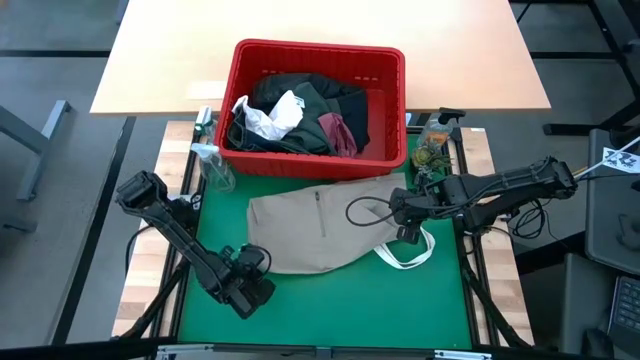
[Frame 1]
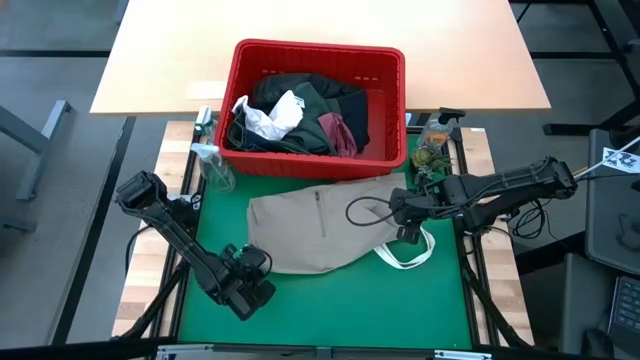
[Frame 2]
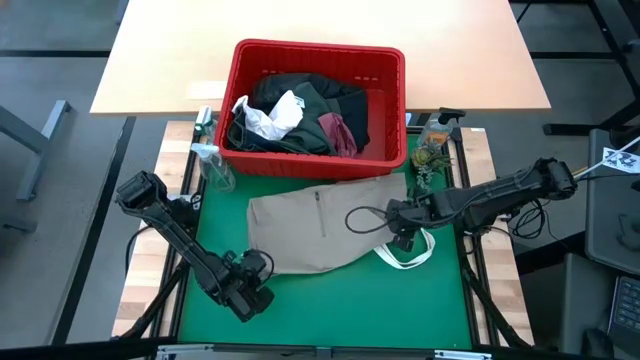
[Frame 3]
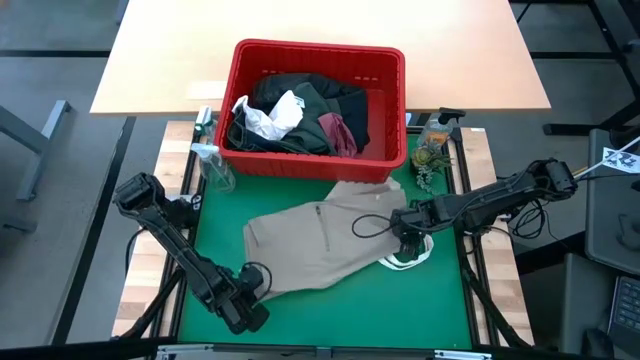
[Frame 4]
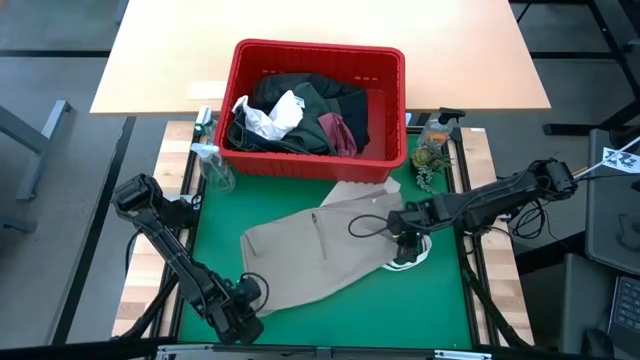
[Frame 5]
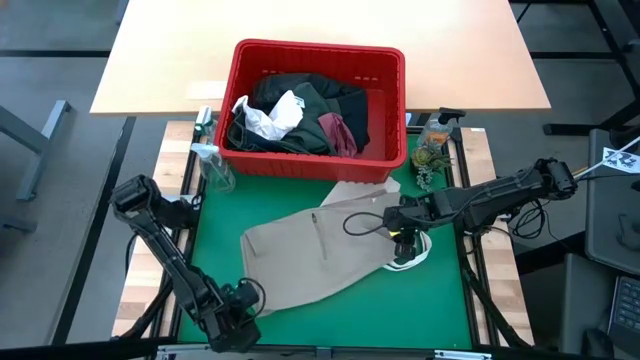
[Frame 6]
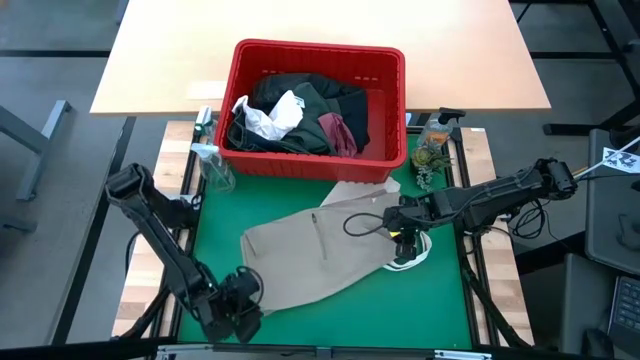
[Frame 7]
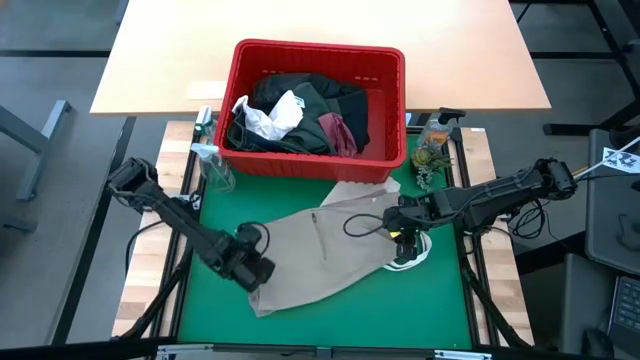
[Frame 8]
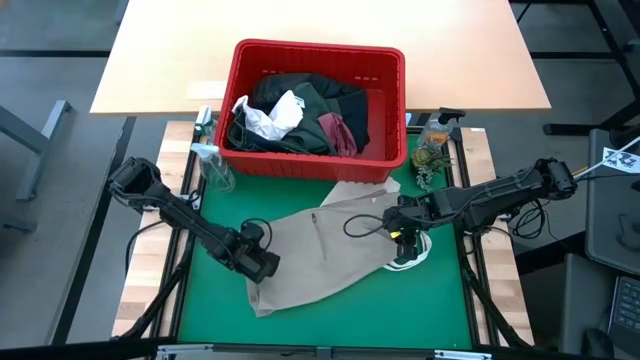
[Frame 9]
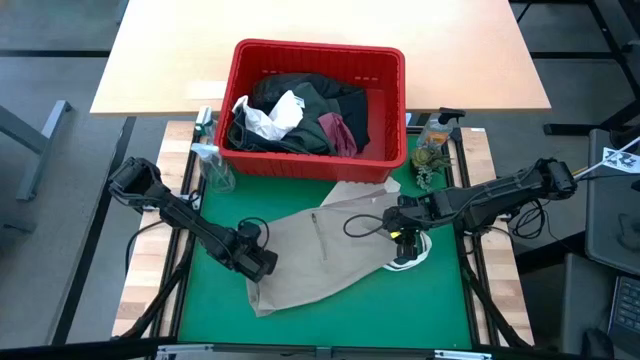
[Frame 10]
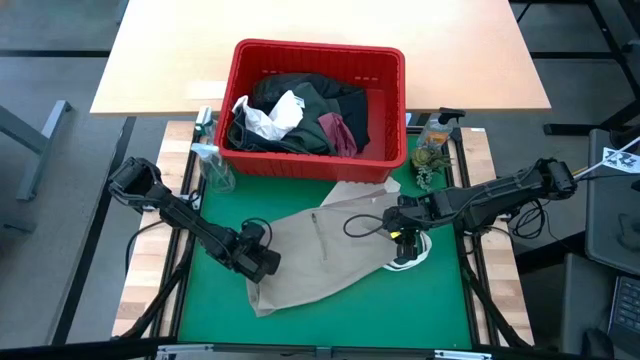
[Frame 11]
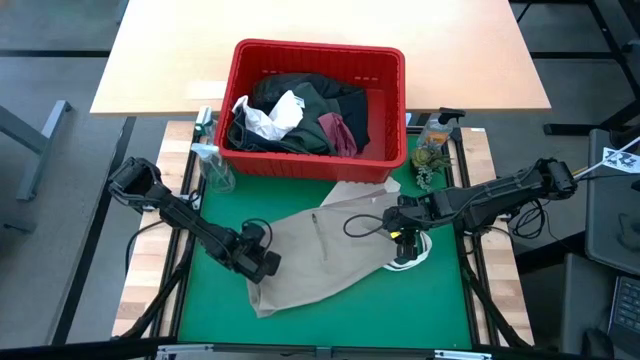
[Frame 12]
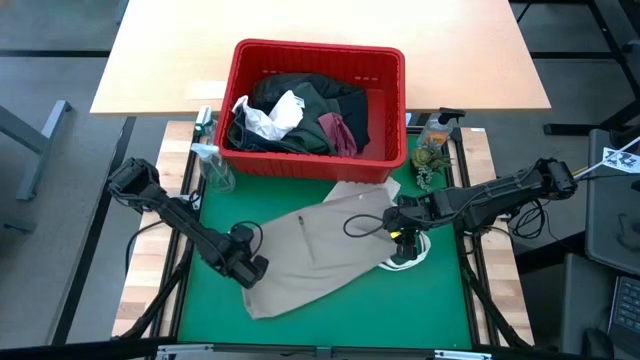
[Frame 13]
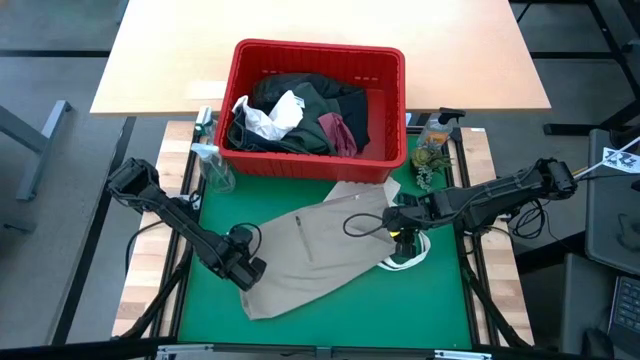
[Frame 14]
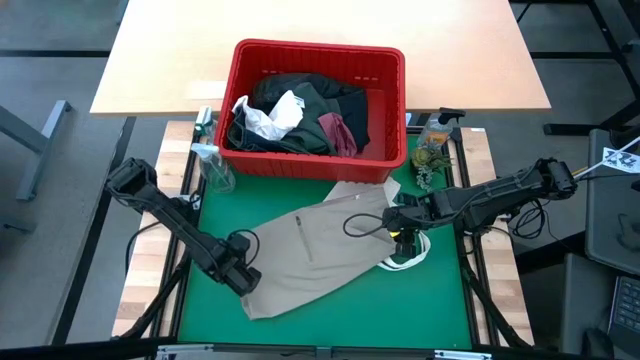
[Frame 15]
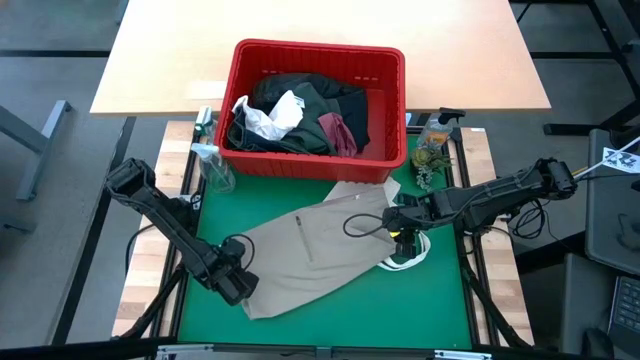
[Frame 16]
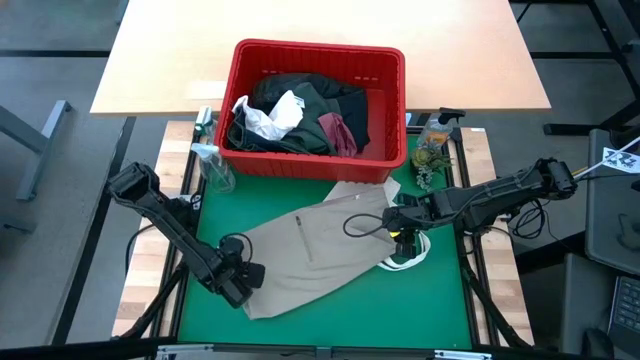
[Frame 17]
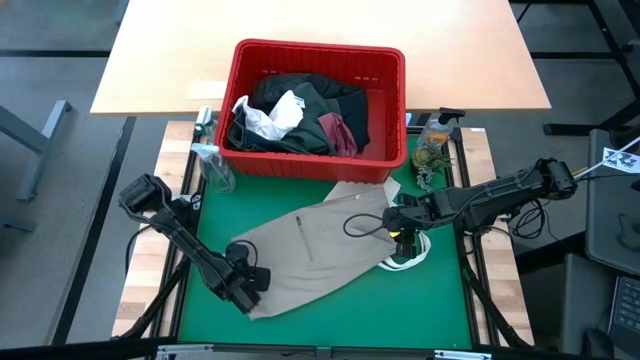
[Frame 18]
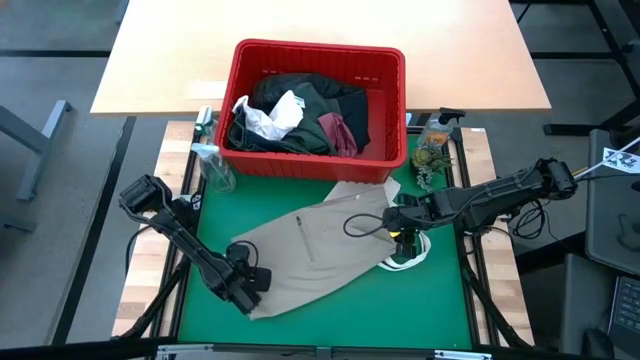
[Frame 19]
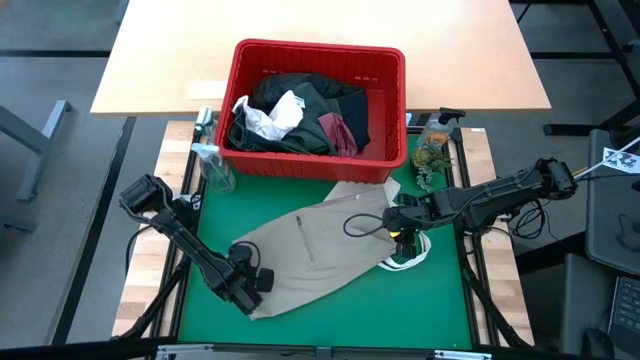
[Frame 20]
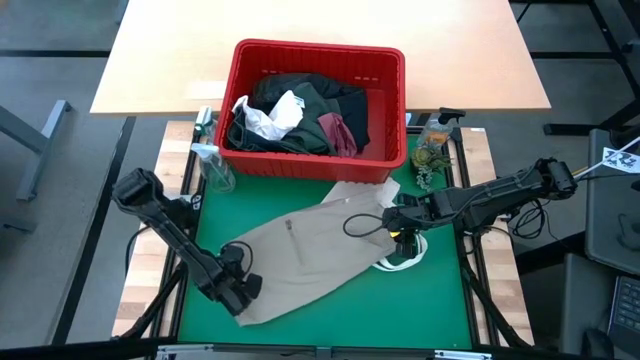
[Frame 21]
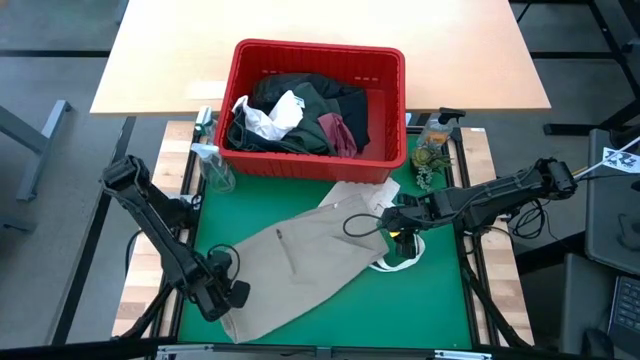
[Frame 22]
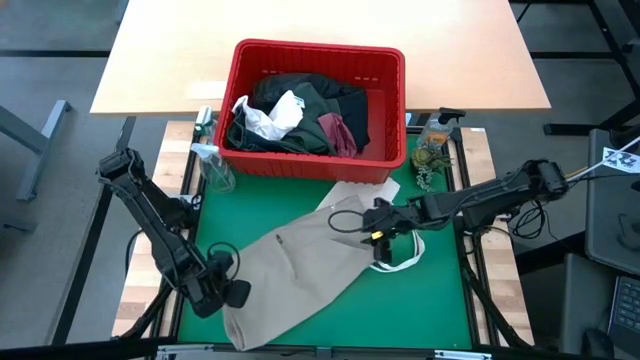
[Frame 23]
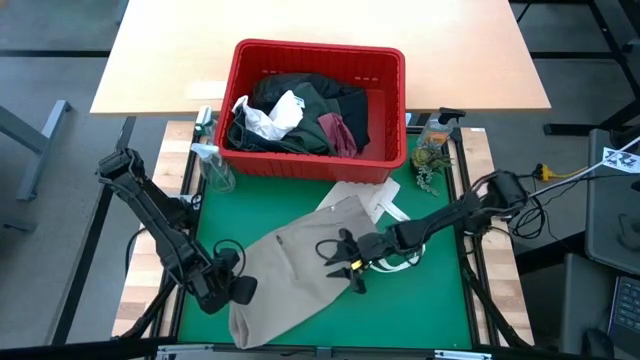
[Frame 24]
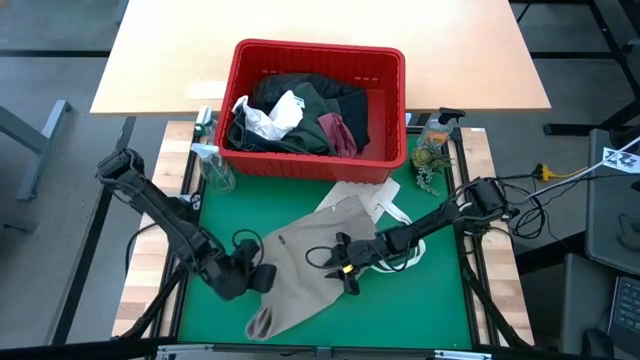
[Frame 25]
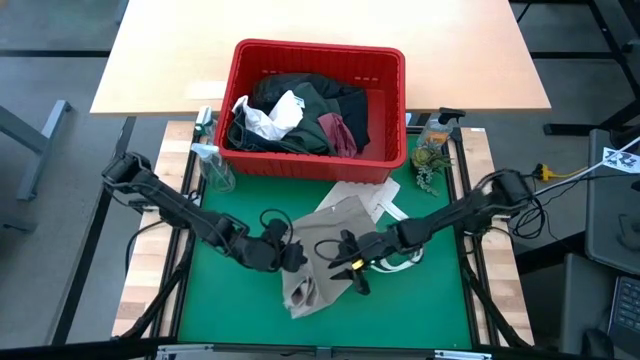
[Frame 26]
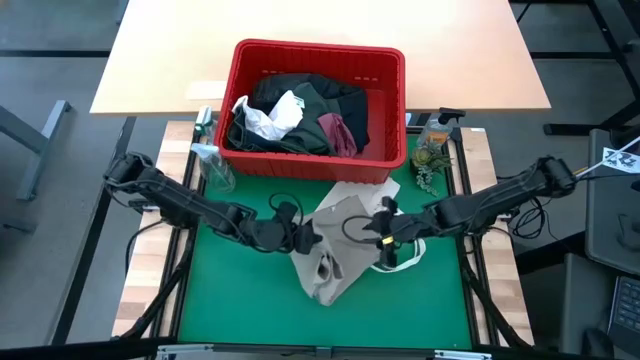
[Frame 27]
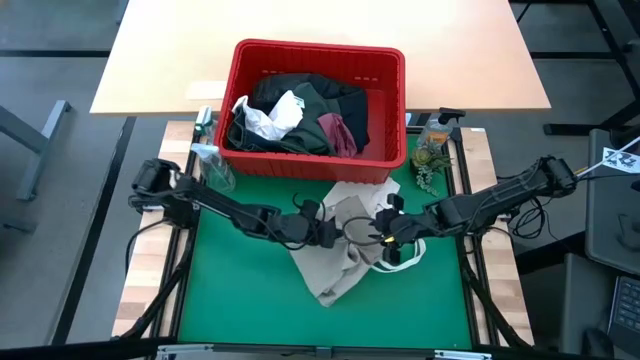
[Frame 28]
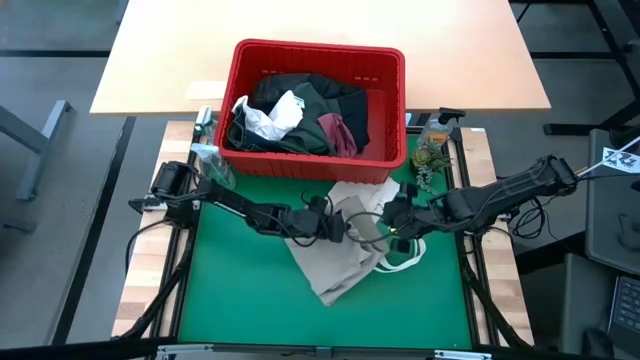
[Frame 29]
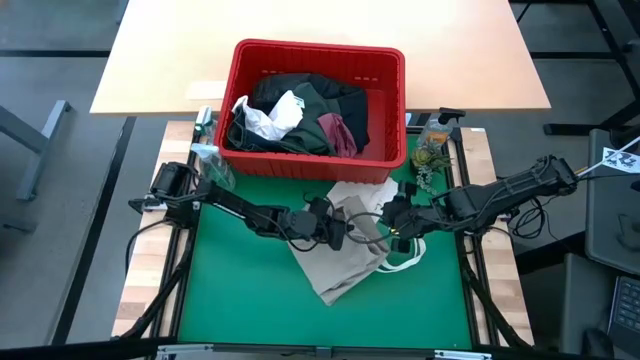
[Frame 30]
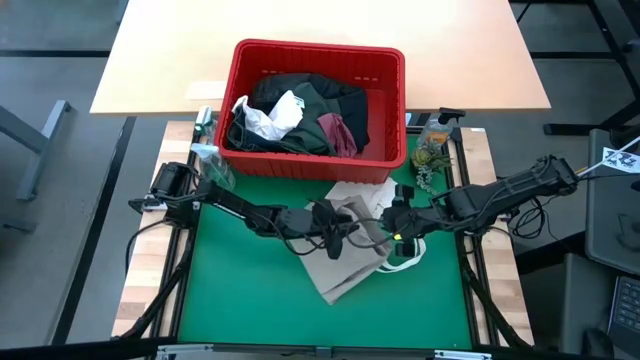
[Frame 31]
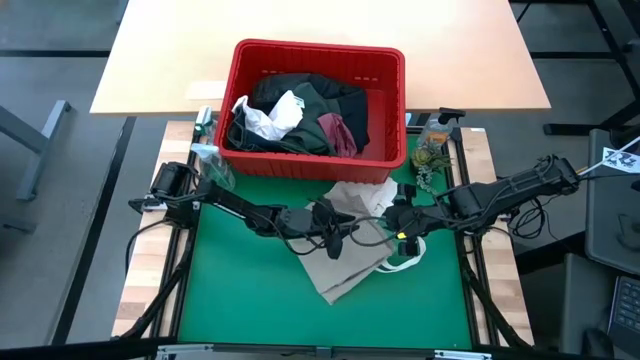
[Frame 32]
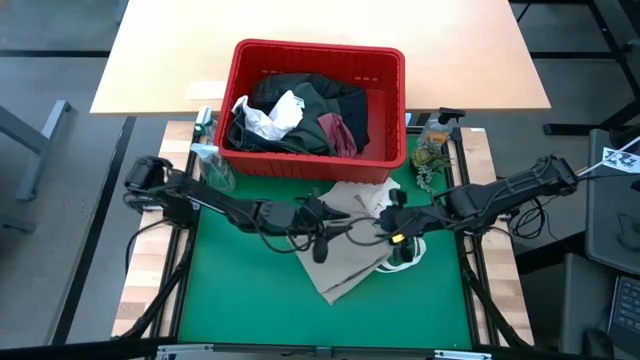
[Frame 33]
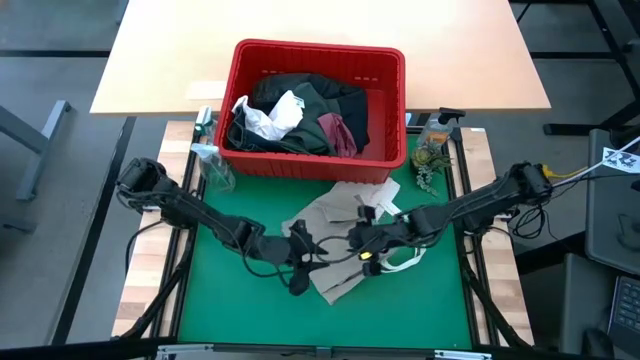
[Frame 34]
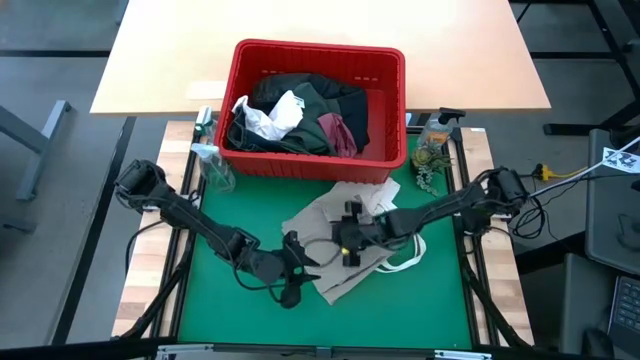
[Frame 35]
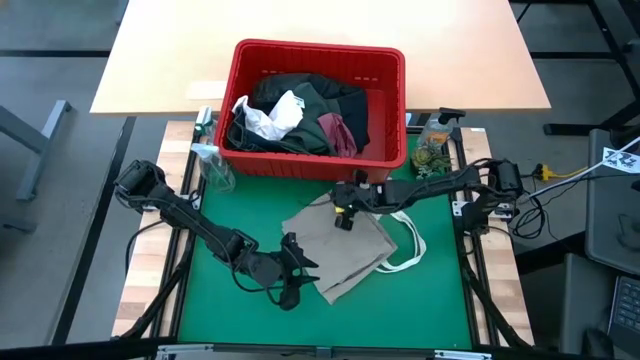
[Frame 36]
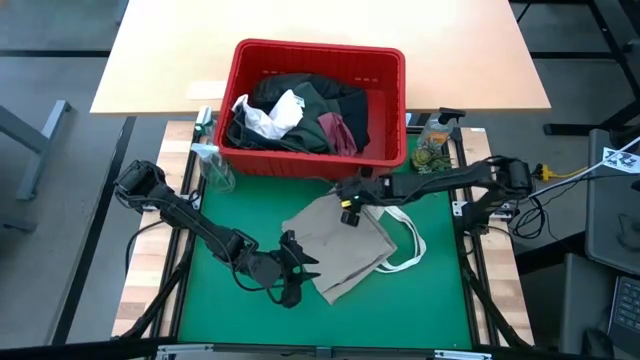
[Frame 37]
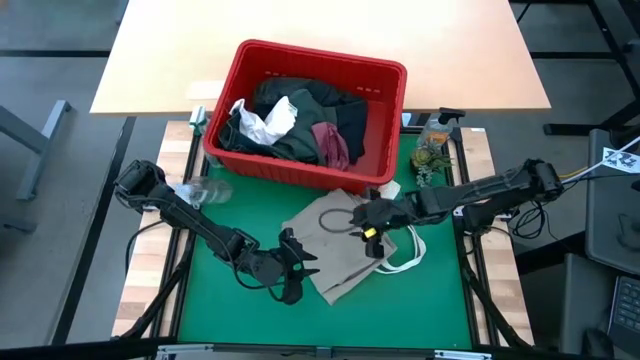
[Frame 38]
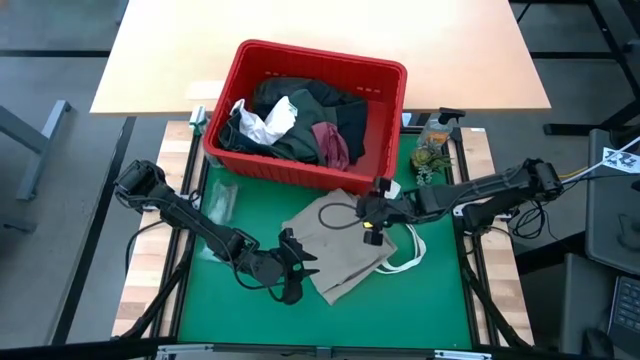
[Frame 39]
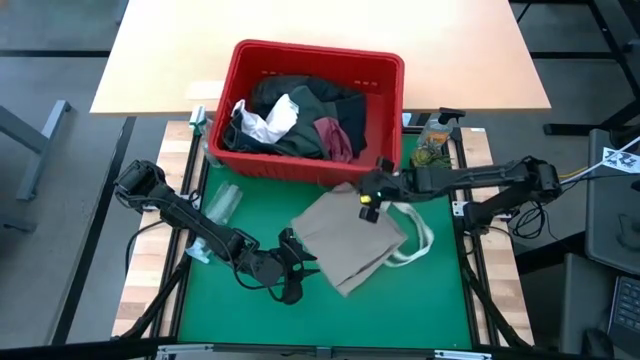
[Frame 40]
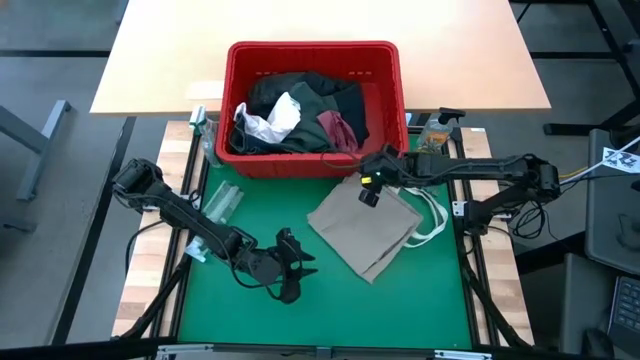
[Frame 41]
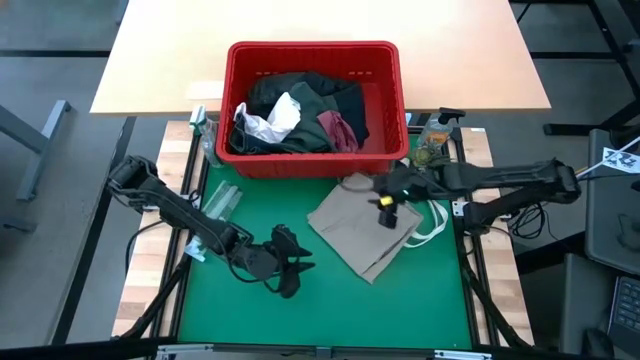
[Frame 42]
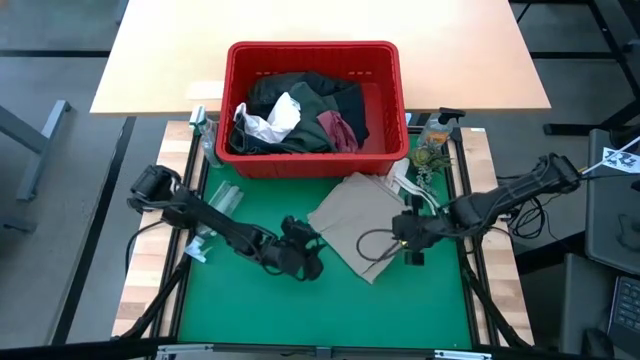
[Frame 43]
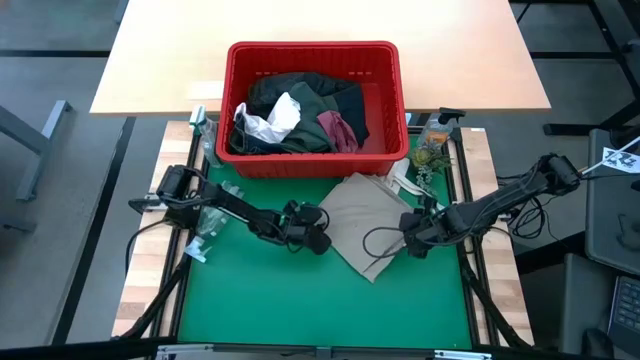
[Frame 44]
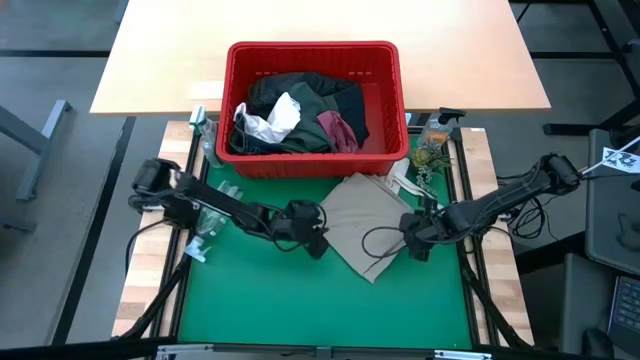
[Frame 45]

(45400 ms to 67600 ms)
Task: Fold laundry
Fold the brown shorts
